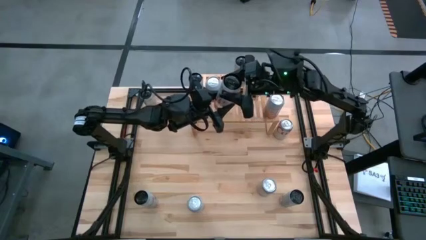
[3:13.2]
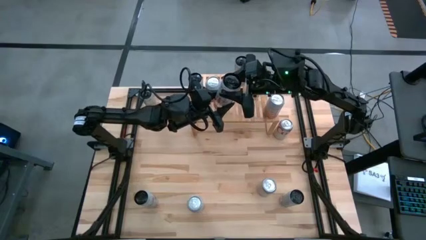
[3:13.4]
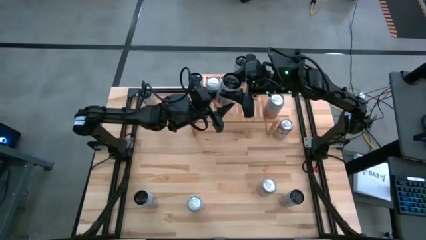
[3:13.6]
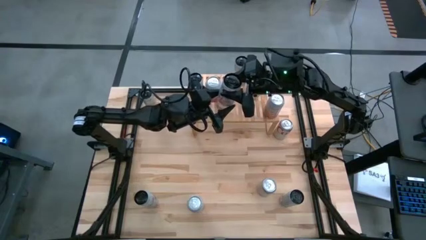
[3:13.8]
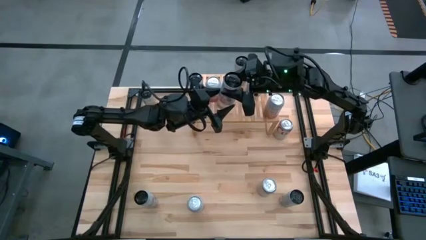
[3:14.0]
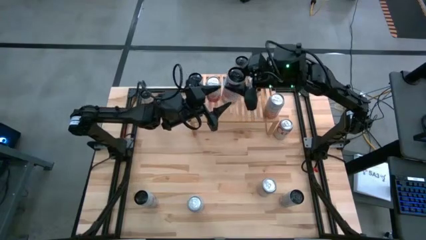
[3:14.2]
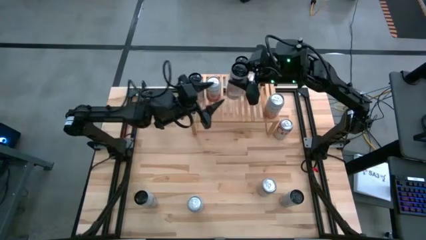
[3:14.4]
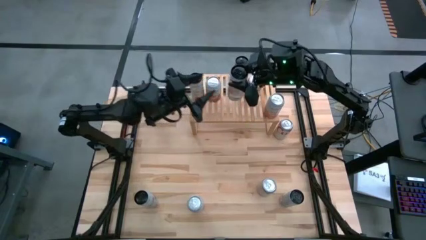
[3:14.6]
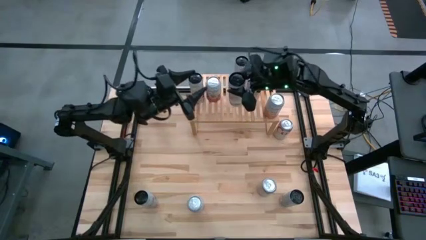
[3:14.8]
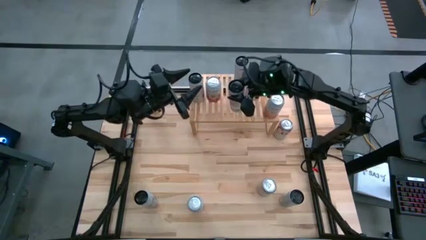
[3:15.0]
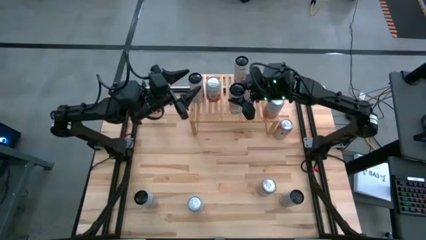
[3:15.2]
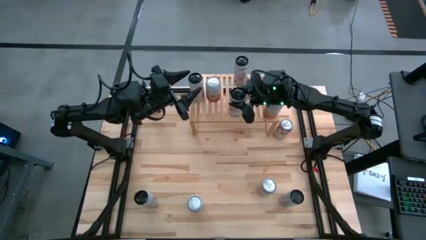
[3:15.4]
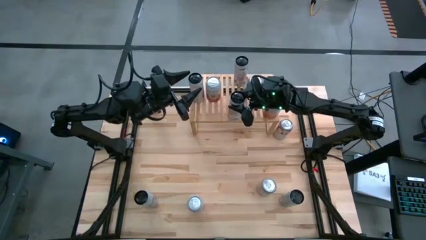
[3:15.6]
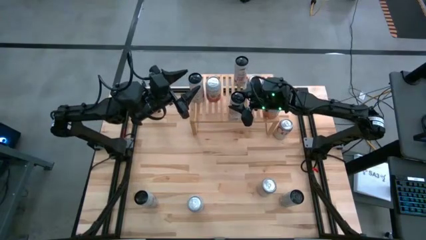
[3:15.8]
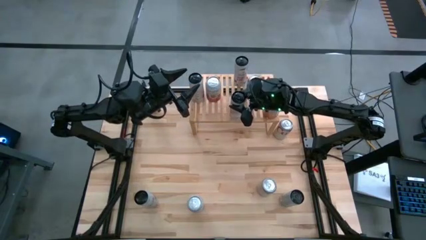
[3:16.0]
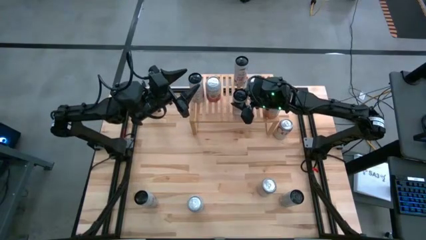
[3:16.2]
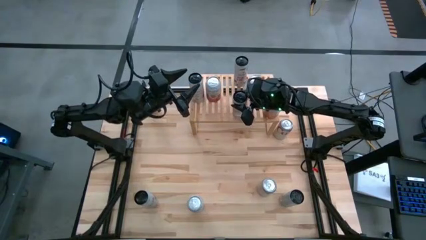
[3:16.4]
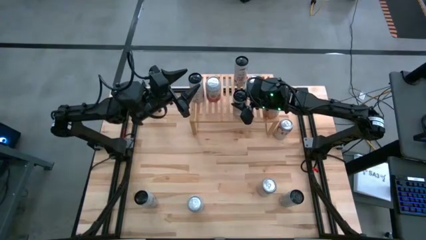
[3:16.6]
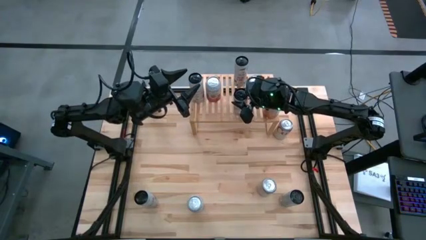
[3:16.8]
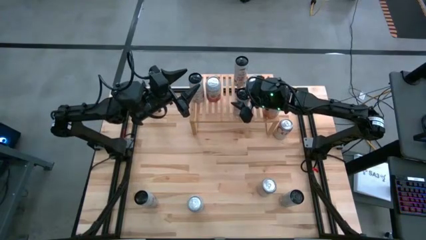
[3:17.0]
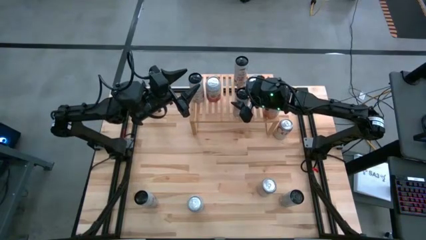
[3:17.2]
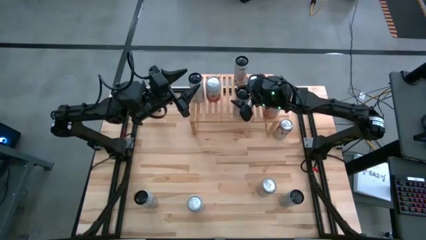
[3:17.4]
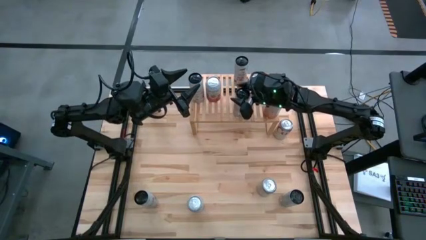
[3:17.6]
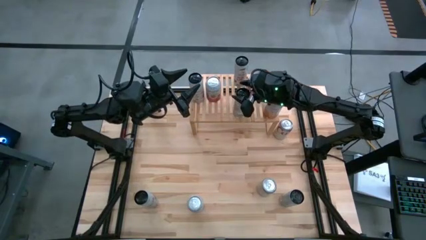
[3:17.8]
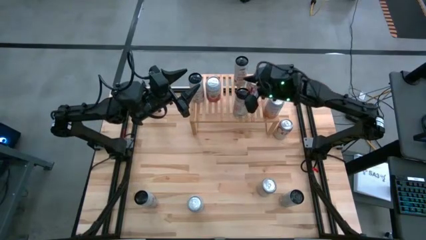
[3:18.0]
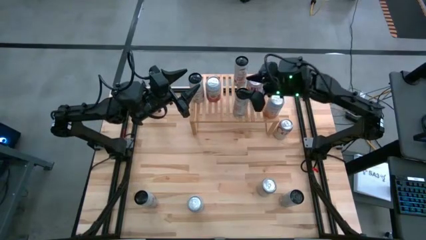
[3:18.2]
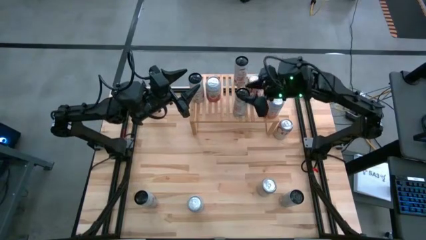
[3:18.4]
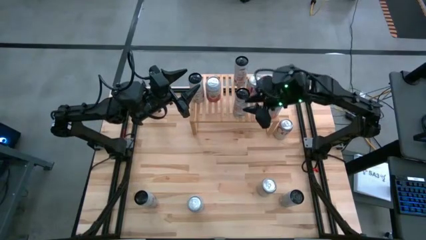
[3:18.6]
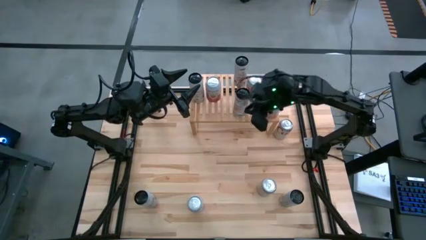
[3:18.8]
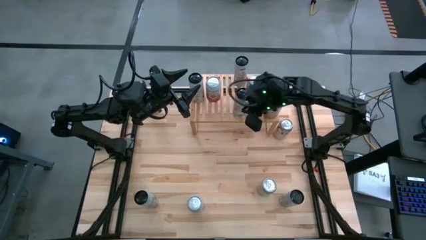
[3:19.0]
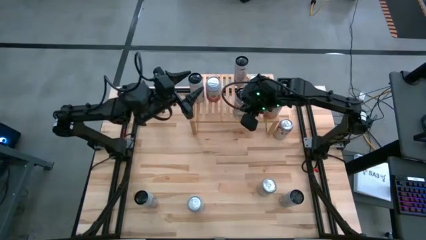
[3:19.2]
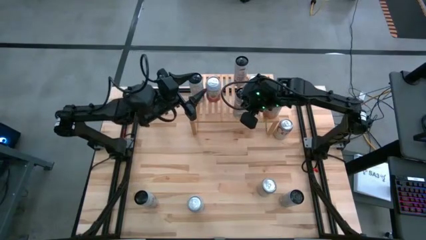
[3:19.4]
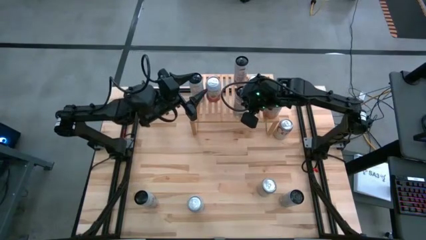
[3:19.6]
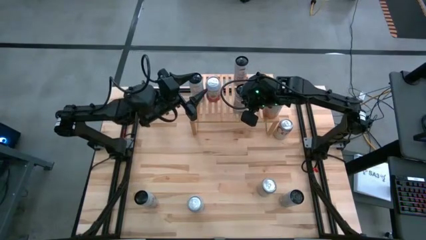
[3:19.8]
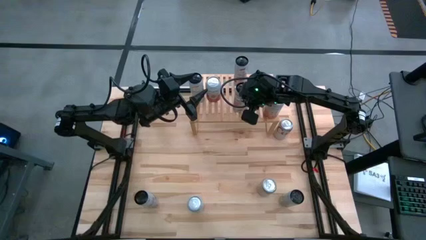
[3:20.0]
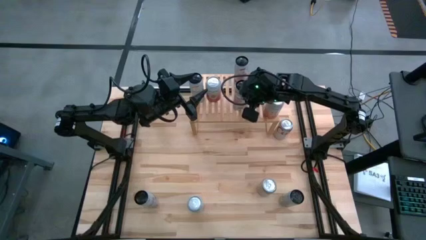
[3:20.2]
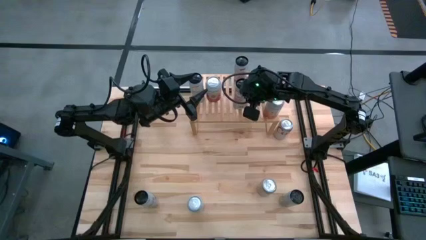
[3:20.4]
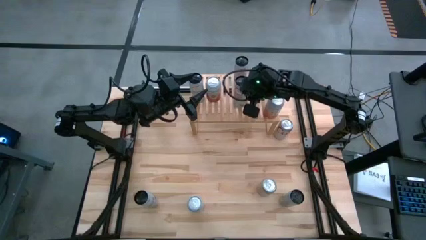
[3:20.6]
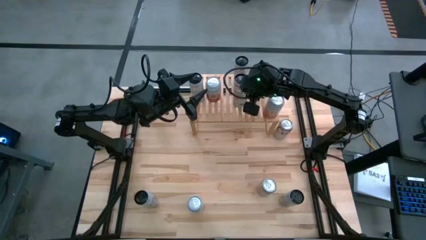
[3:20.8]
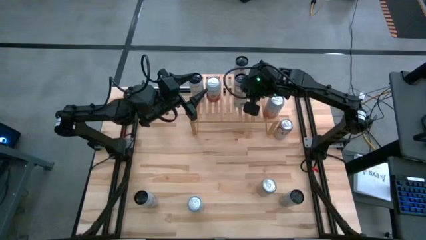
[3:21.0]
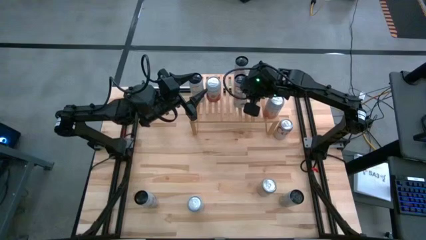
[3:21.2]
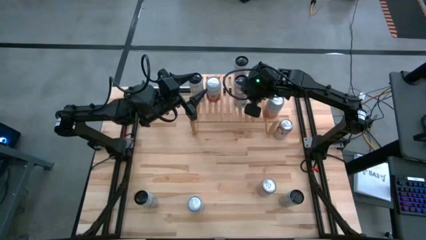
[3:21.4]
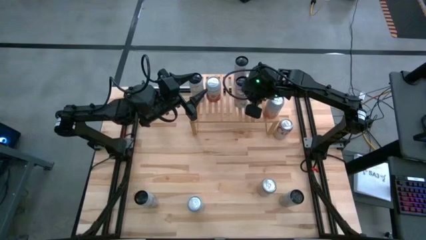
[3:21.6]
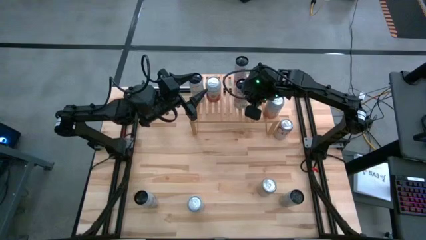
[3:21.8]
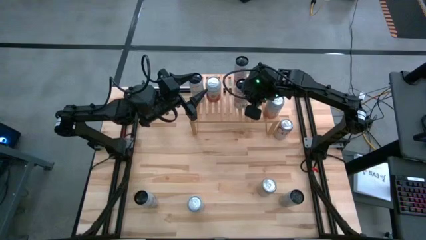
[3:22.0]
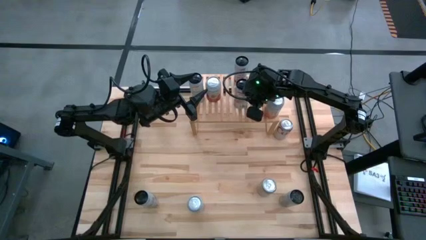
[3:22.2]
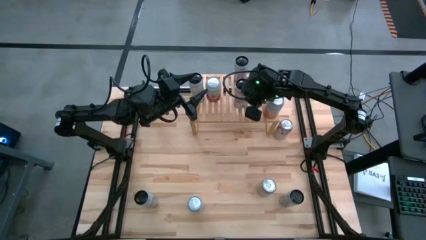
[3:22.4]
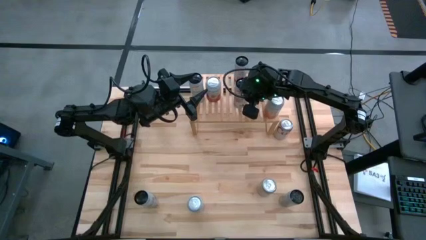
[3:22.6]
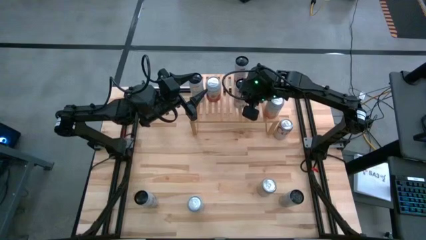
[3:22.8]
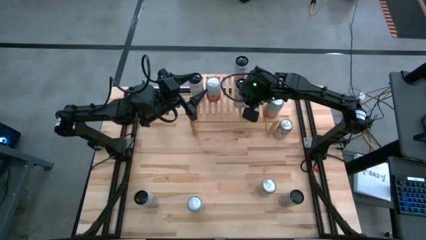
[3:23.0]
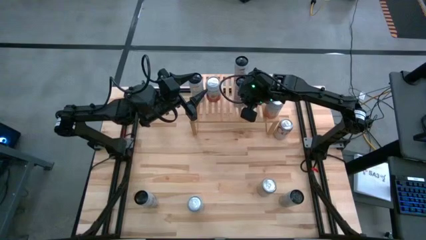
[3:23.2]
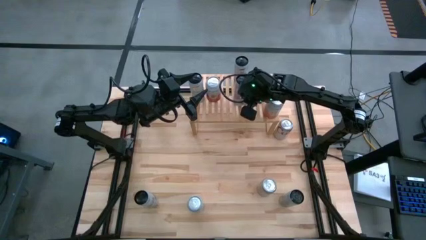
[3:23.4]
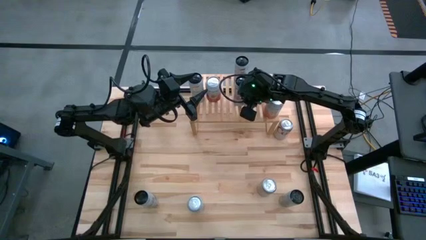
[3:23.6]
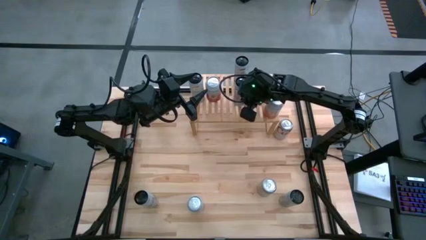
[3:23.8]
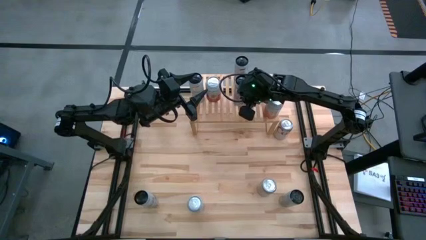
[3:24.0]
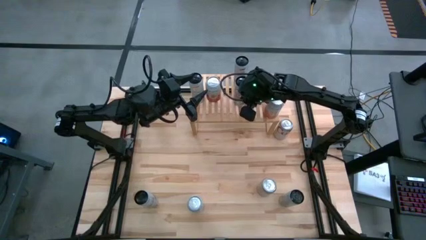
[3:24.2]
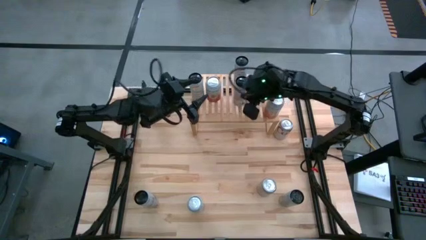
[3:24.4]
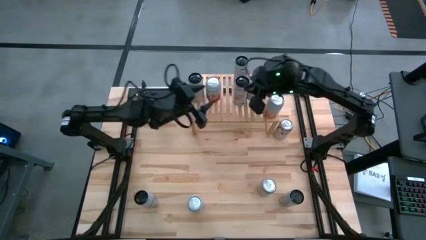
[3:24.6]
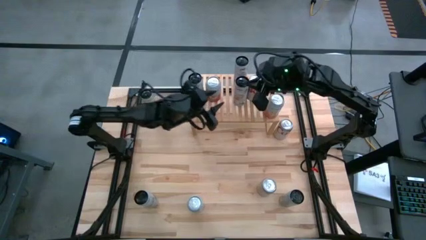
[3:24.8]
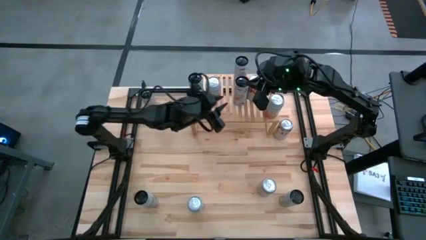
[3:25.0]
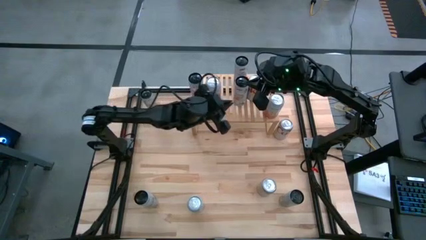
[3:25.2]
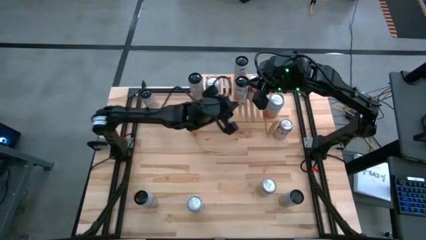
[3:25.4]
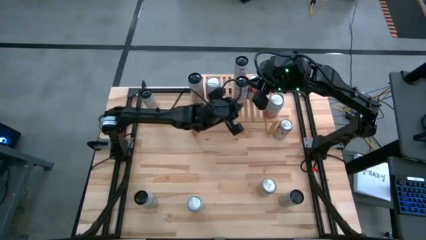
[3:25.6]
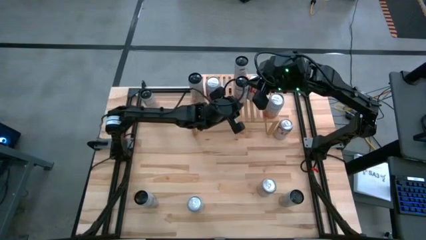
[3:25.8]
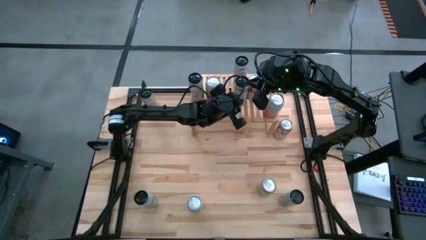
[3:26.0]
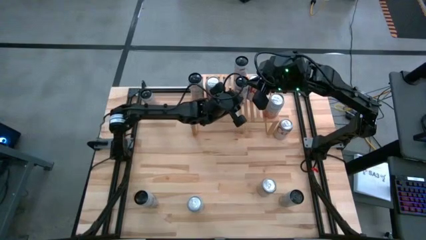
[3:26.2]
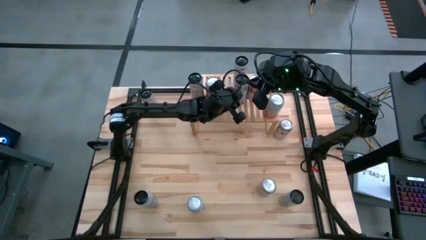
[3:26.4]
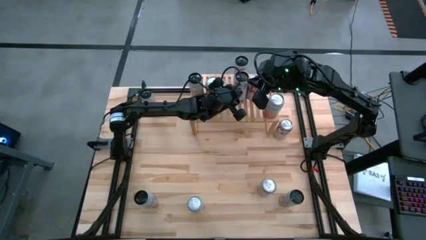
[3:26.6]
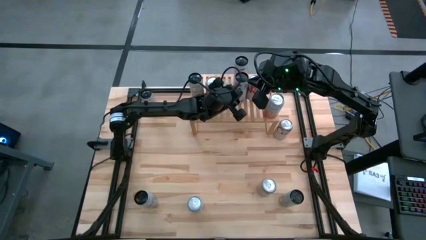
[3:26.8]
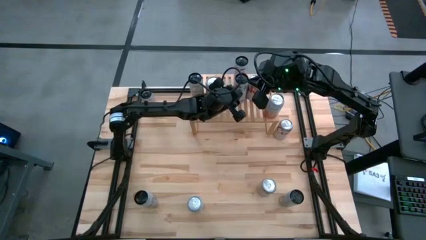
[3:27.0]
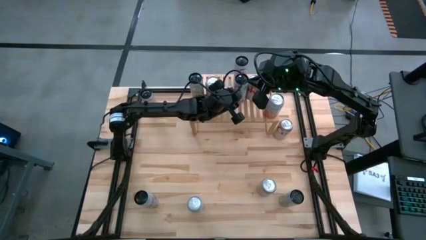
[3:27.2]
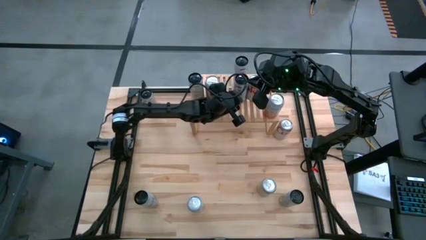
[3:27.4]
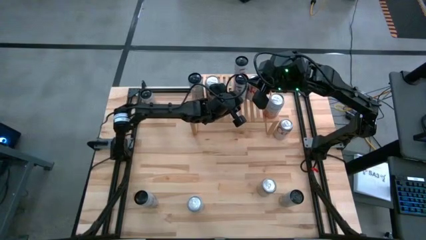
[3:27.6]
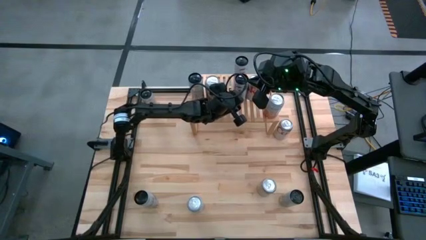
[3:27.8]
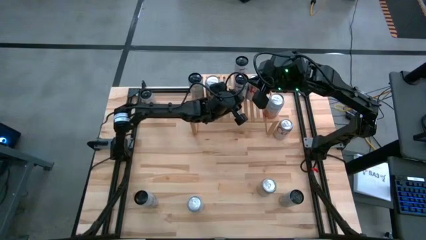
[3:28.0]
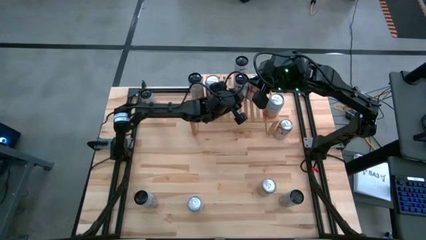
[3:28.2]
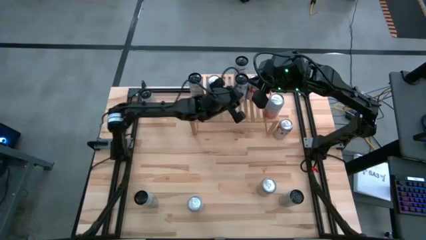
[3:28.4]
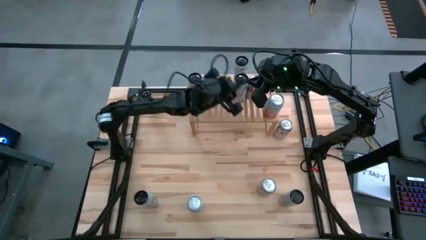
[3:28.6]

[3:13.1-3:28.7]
Task: Place canned beverage on shelf
Put the left white soda can on the shelf aligned with the other white soda can

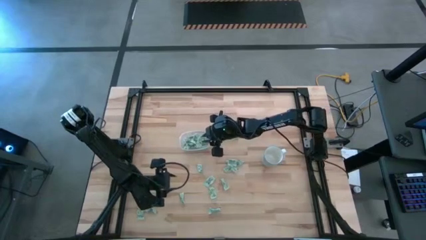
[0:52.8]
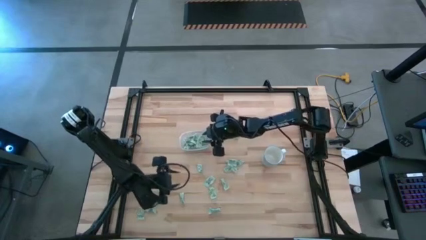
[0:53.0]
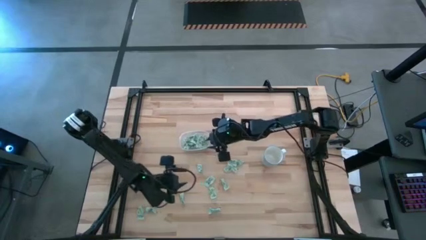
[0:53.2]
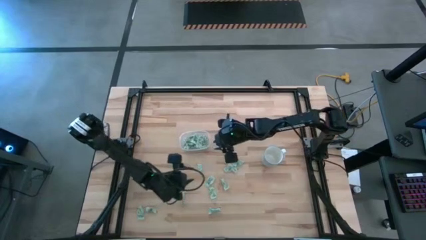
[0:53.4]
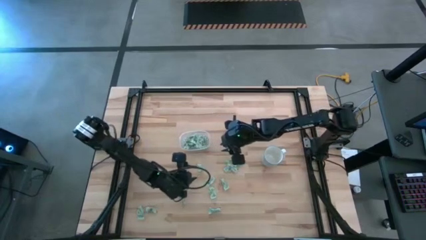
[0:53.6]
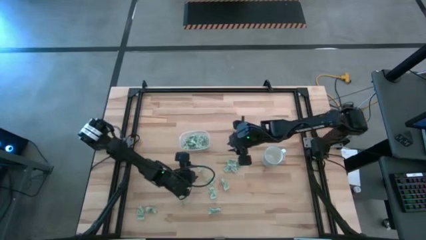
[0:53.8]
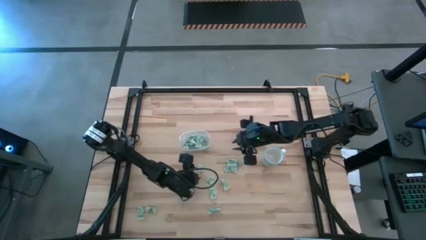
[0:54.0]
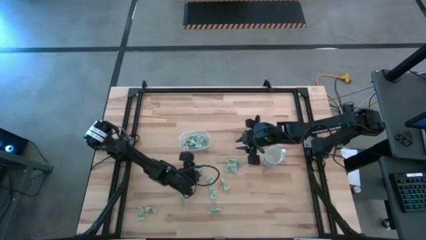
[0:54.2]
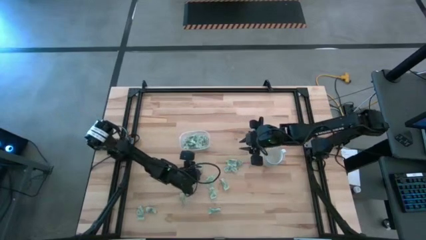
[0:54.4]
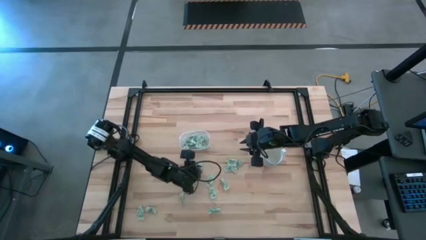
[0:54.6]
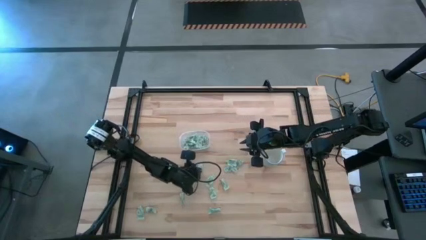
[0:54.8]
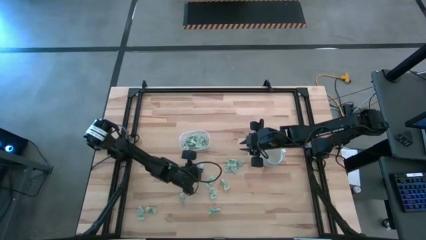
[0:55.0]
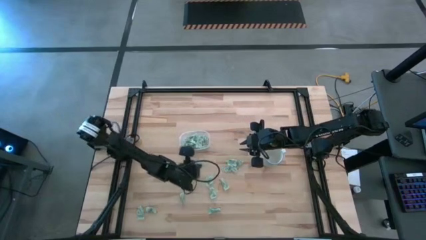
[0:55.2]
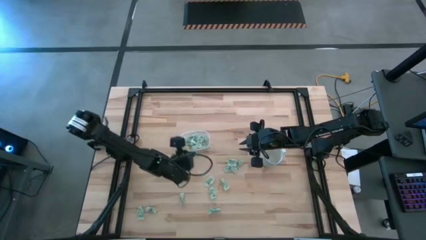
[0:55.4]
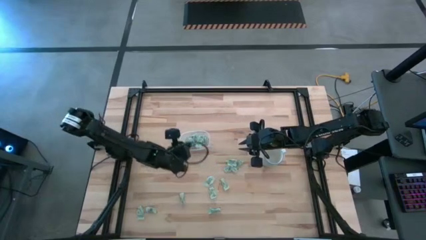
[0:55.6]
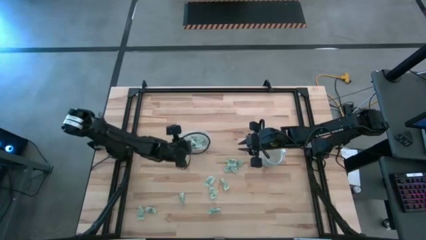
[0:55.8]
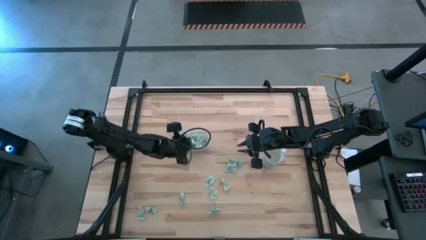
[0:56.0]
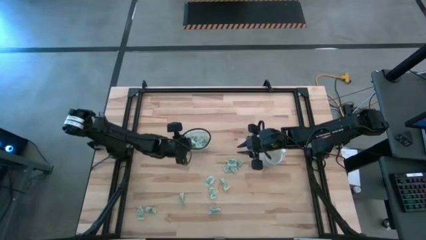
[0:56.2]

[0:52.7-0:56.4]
Task: Pick and place Stevia / Truvia into bins
Put the stevia packet into the transparent bin
